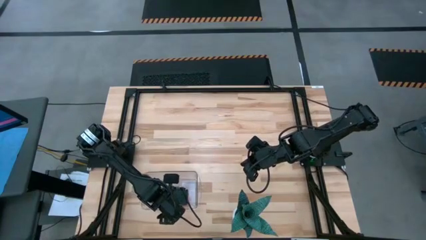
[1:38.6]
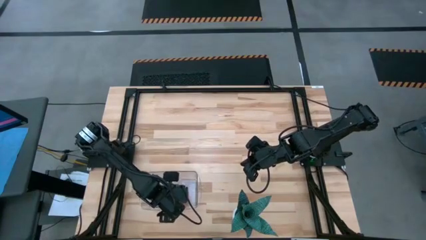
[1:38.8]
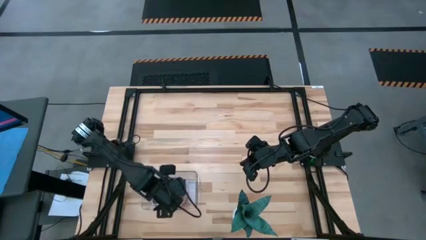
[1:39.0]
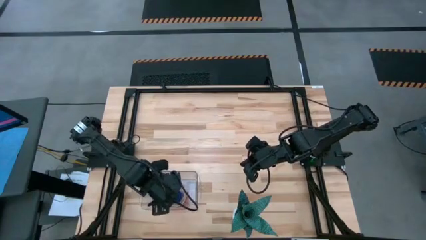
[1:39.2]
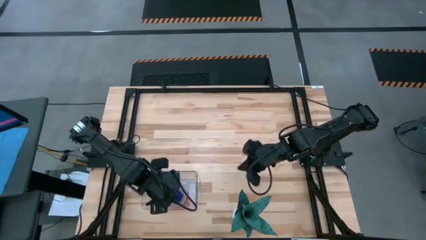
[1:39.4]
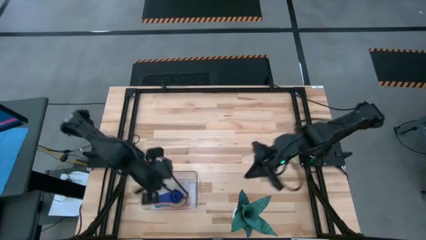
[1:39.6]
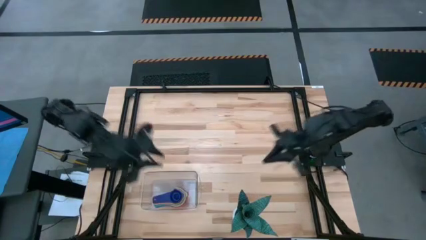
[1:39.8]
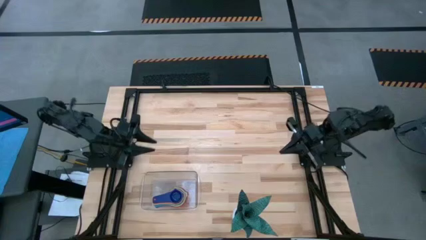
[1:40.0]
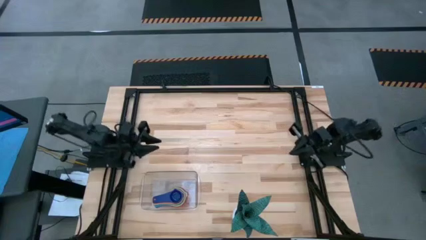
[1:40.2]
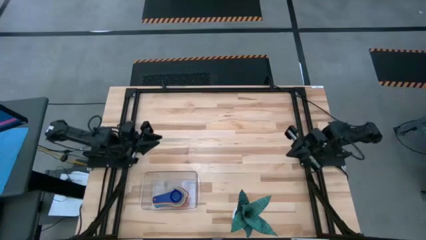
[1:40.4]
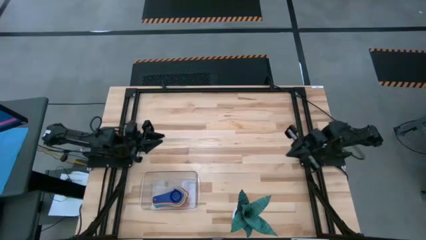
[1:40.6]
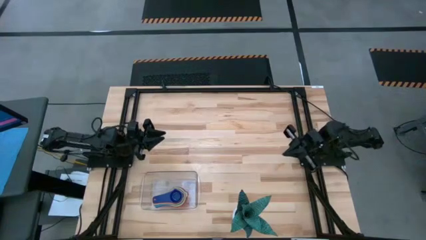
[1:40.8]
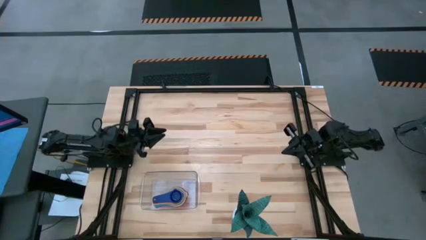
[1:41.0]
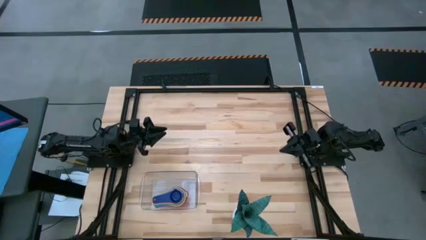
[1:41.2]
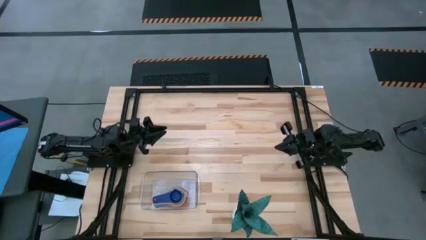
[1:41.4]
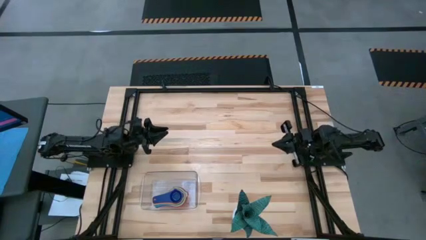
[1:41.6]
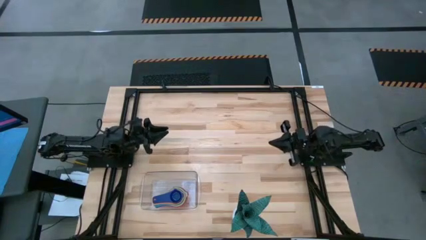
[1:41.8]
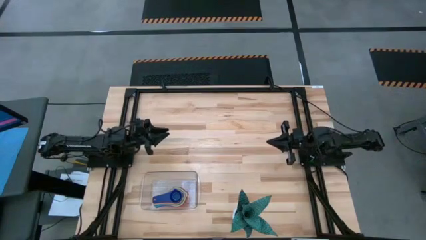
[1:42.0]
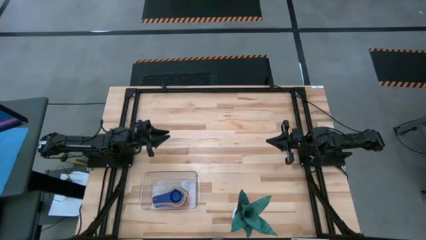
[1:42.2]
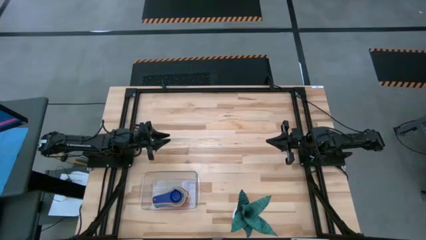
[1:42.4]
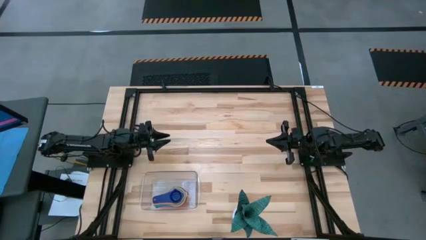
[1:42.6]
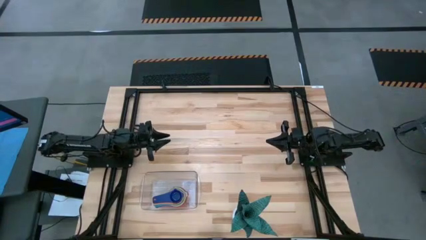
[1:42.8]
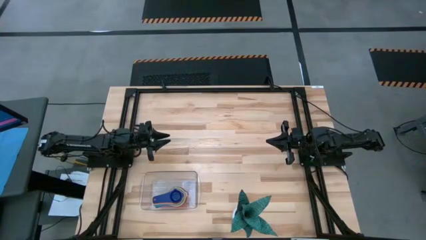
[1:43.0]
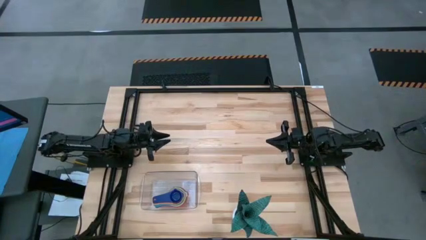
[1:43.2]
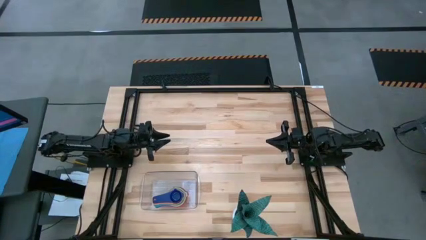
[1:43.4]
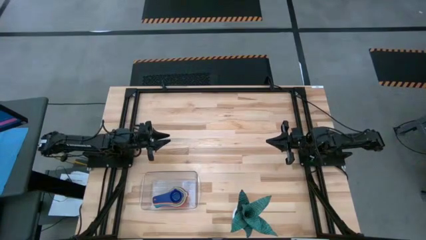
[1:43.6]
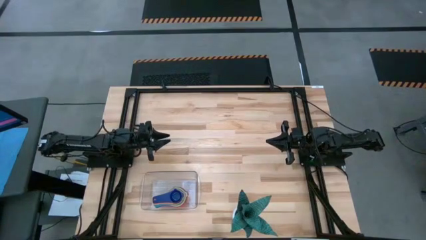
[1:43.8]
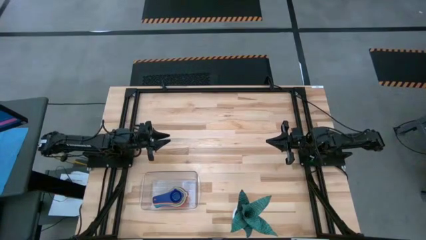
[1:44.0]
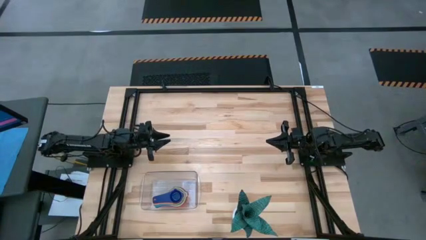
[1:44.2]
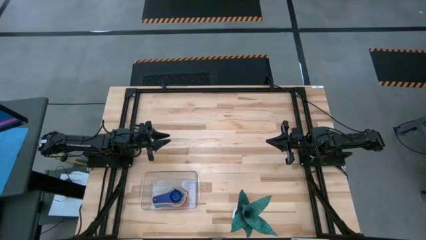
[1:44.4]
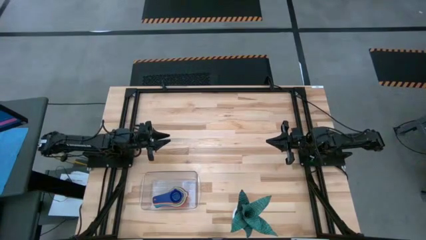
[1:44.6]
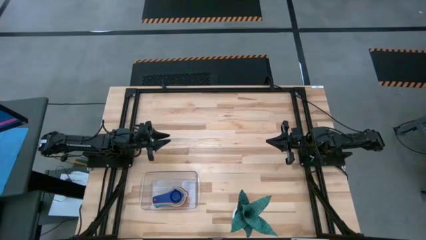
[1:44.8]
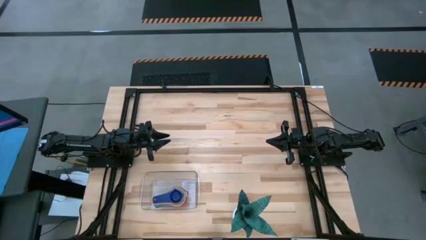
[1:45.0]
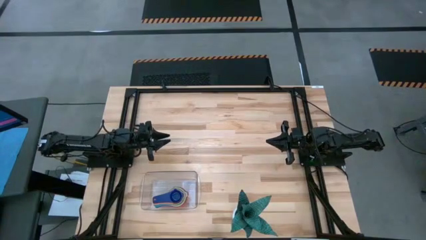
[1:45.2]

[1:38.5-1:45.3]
Task: Nest measuring cups in basket
Return to Home Position

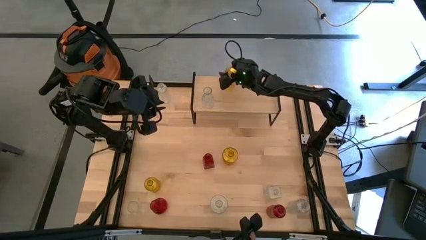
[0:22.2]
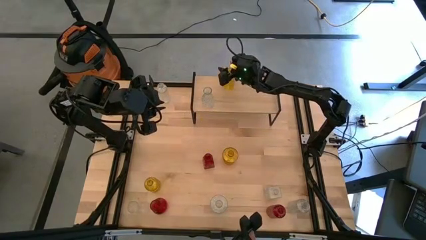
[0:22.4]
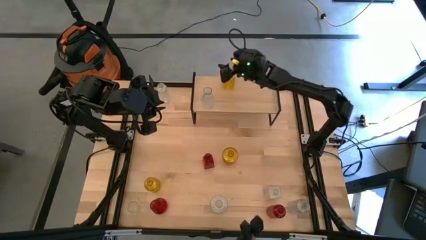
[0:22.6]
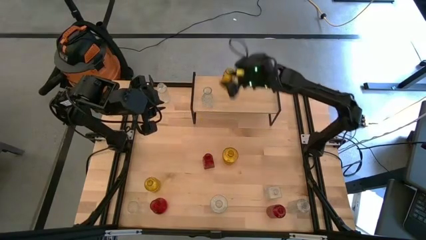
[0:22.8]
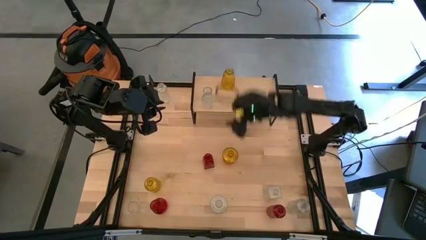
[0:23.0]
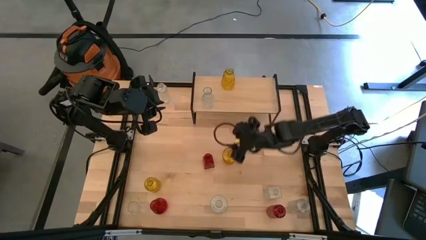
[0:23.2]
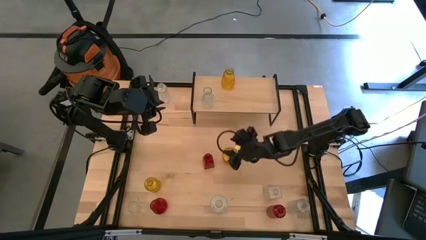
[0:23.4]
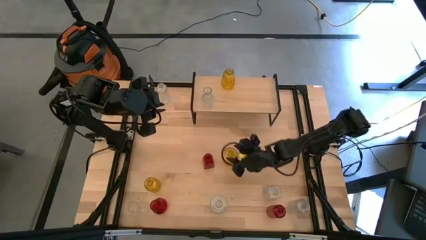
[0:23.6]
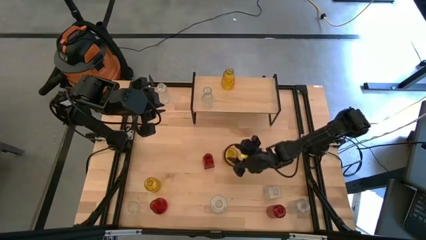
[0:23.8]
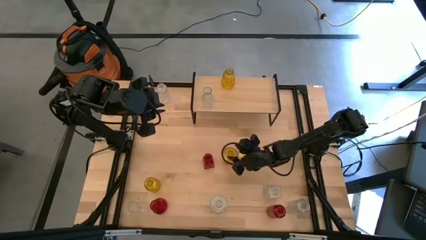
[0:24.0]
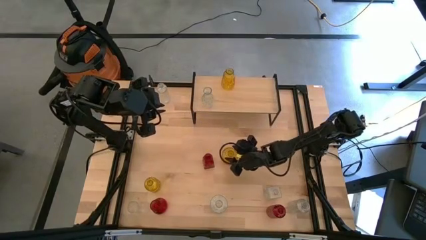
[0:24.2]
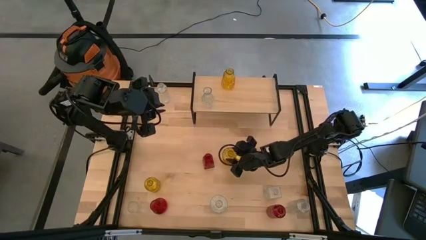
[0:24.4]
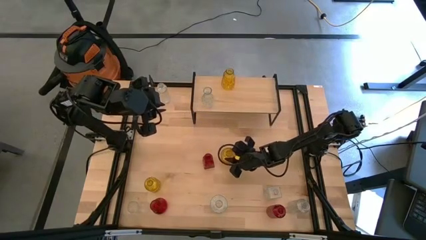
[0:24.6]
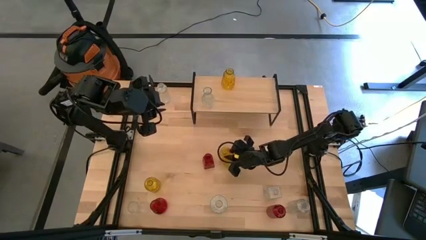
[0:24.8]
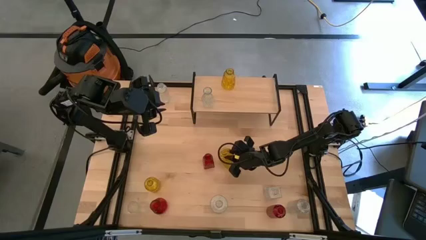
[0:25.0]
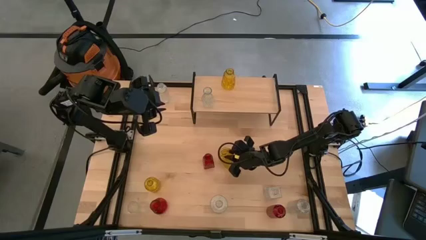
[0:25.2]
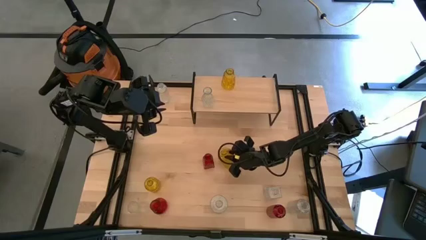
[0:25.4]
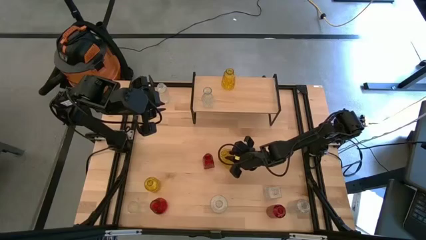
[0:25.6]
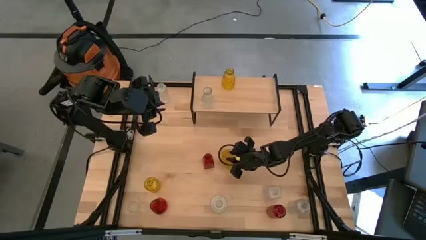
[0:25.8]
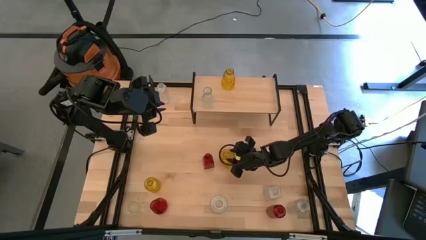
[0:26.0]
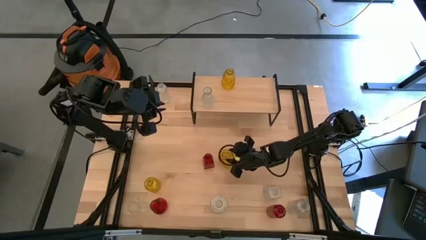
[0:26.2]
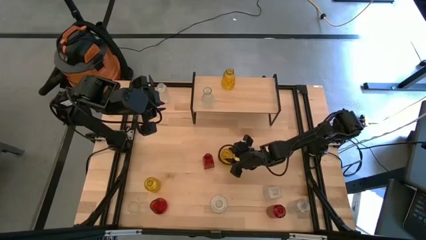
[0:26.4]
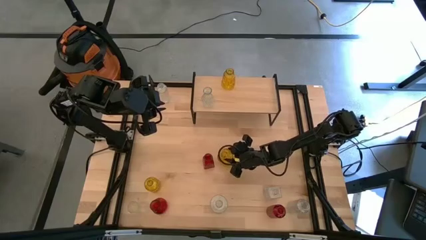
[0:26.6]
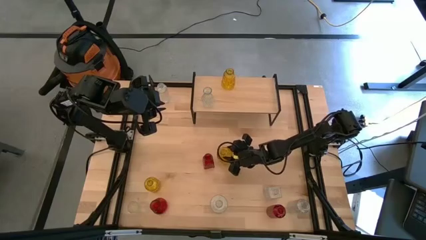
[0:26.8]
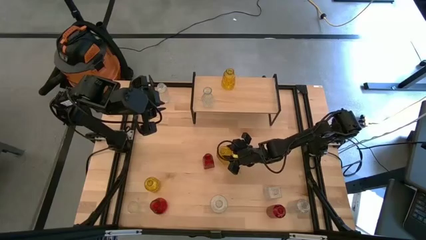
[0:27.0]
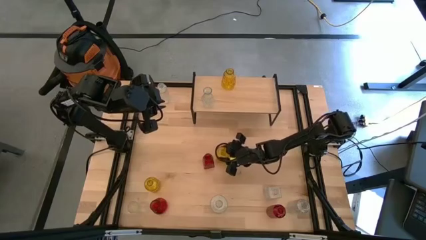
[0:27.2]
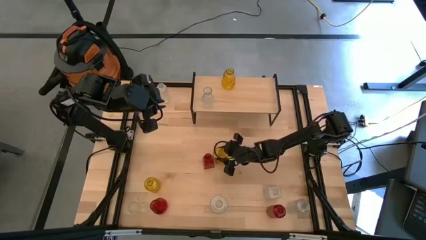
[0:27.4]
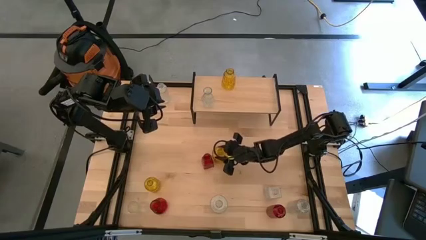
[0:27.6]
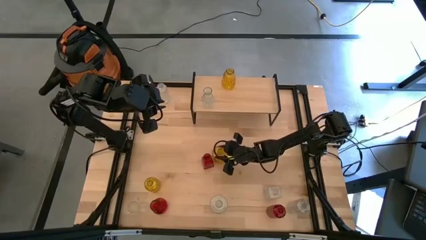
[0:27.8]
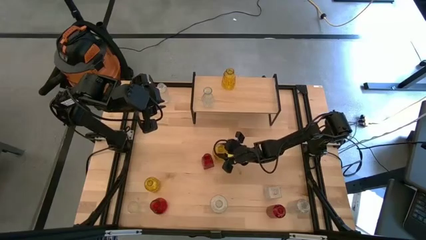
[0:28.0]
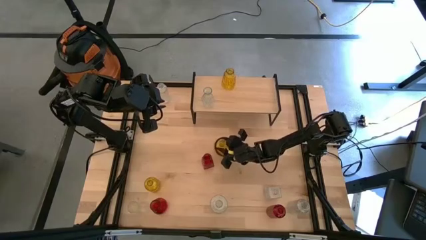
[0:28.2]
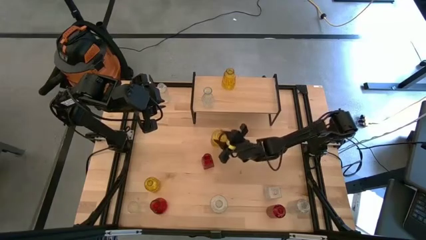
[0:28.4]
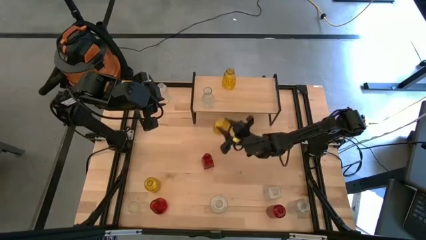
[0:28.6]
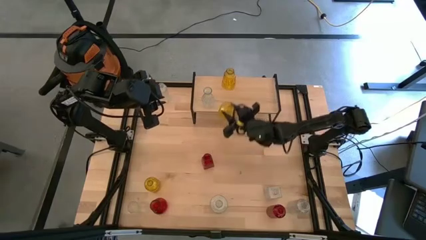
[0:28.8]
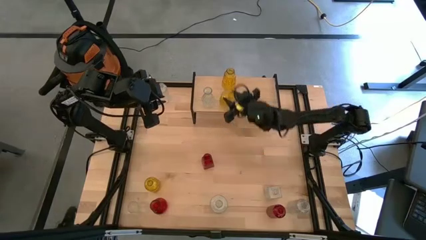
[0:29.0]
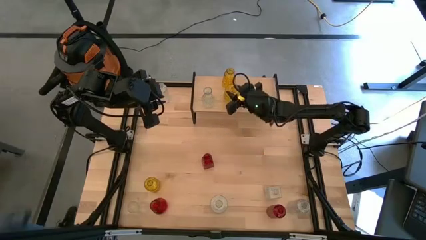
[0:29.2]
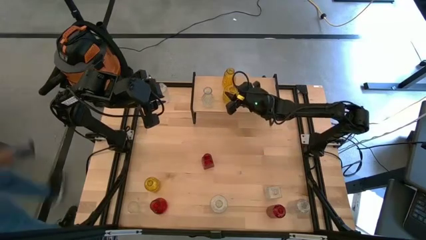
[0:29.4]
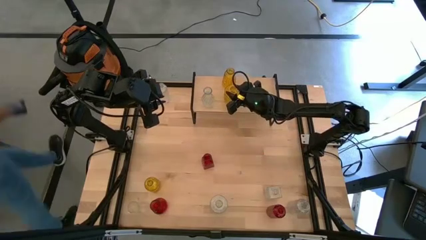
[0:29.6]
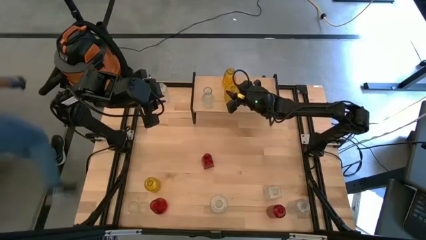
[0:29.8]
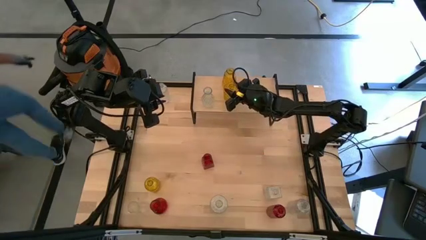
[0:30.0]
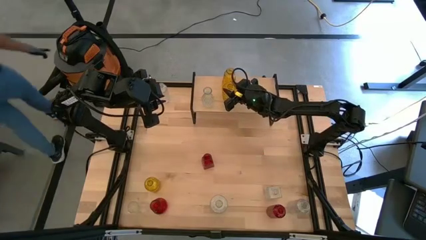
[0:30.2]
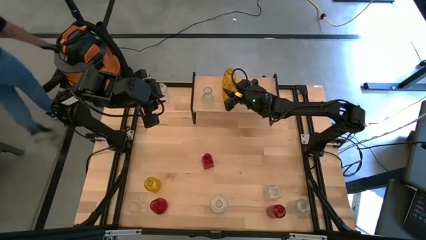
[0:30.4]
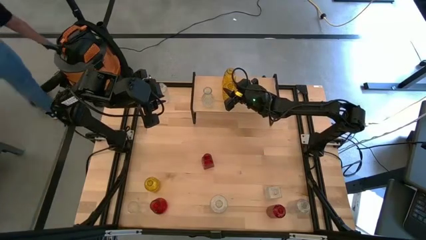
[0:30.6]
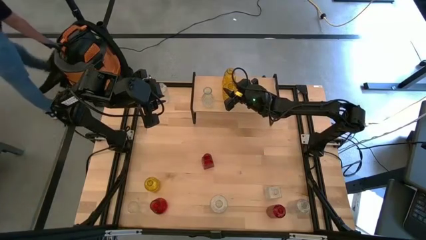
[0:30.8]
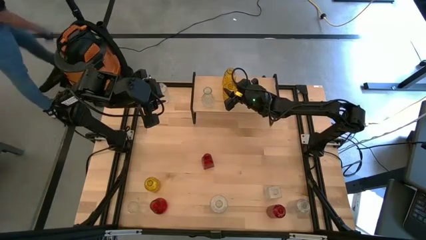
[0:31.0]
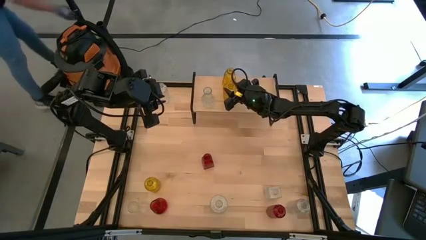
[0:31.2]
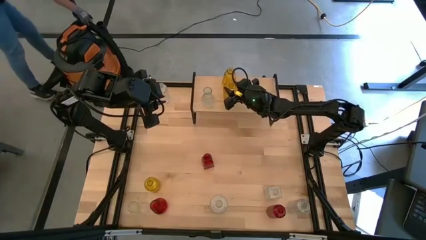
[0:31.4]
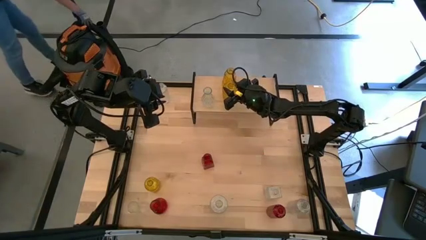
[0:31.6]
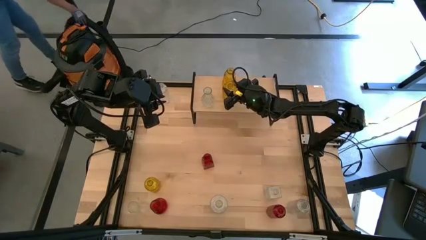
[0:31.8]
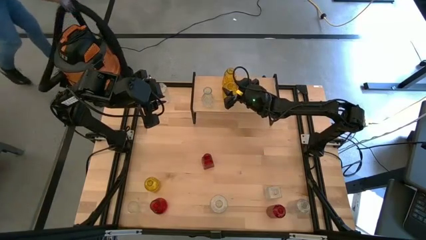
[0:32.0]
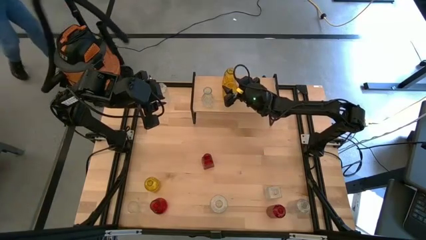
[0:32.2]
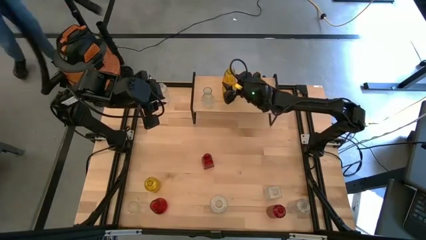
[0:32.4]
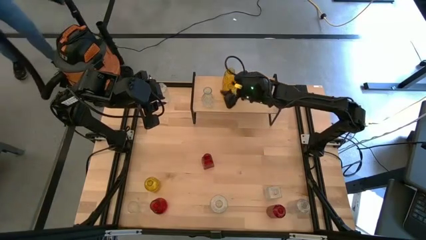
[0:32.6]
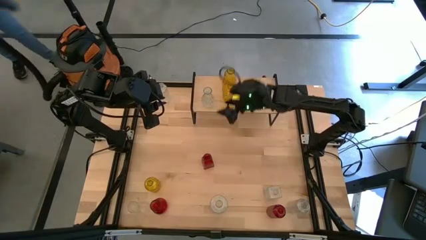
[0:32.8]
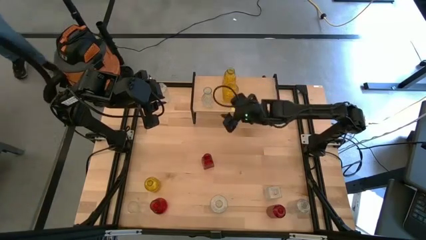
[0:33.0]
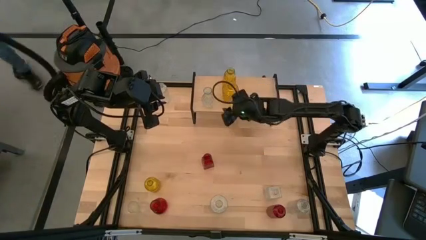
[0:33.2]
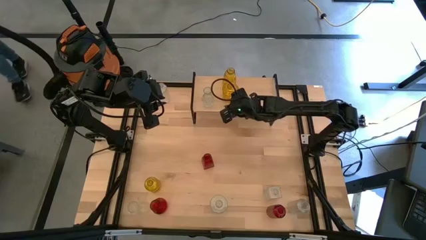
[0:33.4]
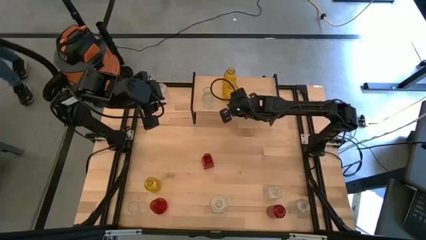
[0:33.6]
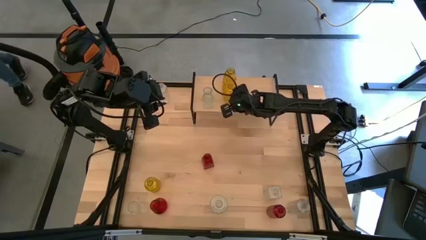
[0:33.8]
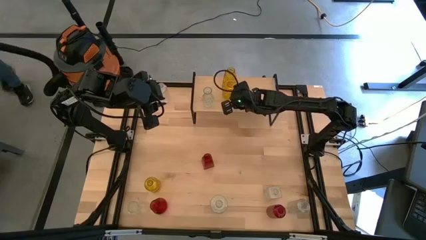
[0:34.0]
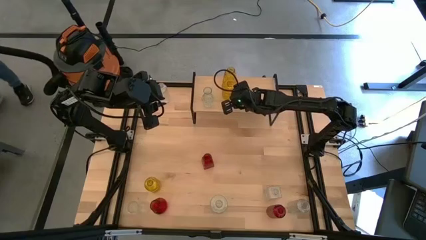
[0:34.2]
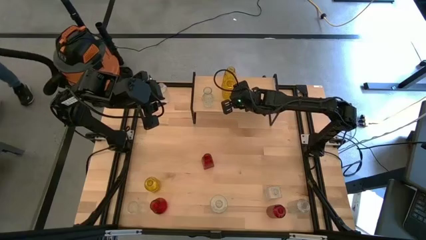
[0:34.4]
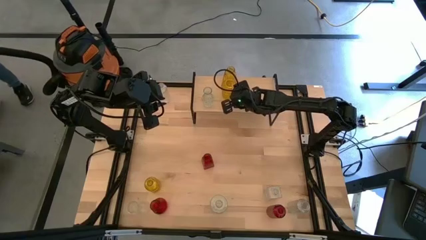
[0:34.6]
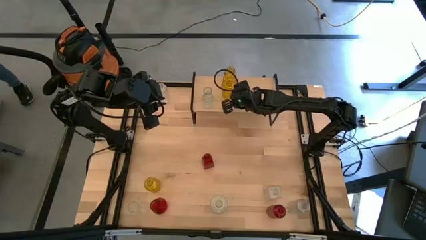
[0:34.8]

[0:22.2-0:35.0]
Task: sort vases onto shelf
Put the yellow vase on the shelf aligned with the other yellow vase
